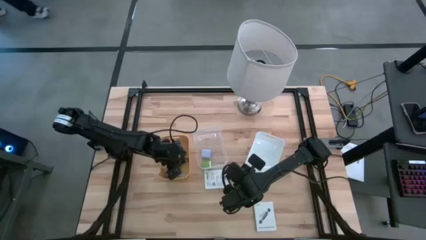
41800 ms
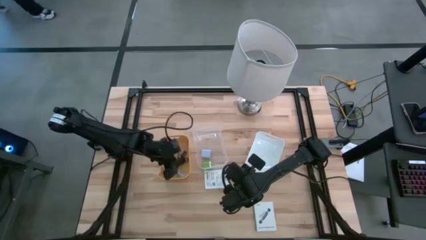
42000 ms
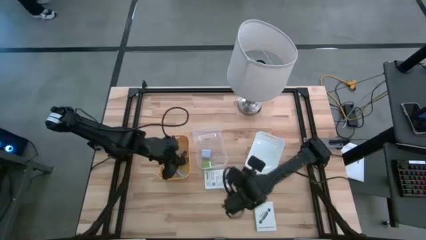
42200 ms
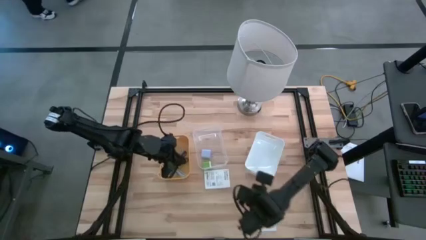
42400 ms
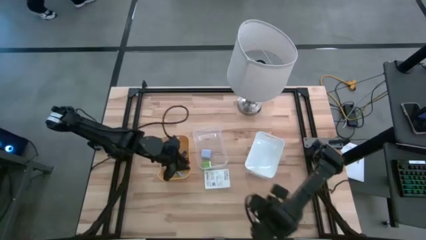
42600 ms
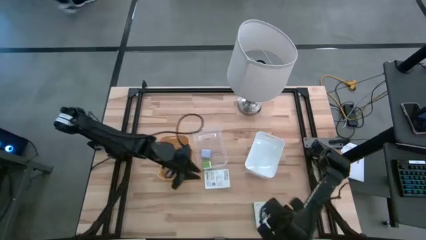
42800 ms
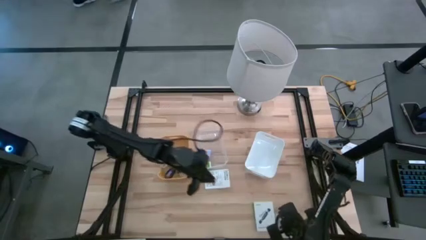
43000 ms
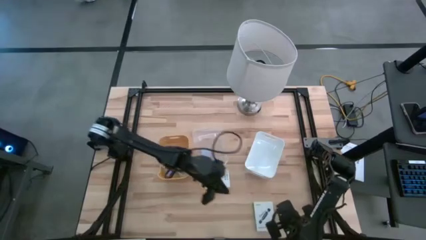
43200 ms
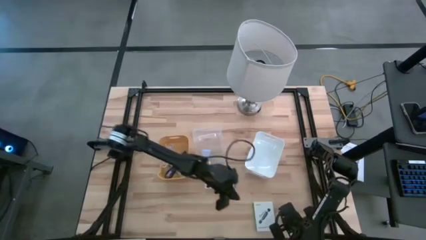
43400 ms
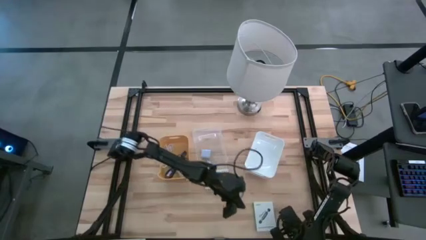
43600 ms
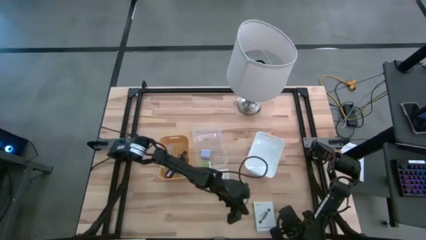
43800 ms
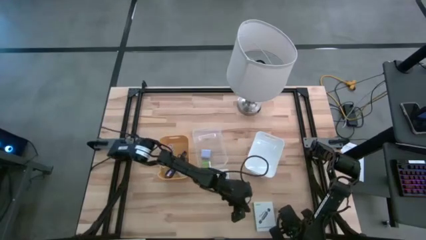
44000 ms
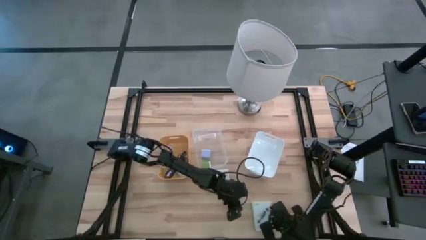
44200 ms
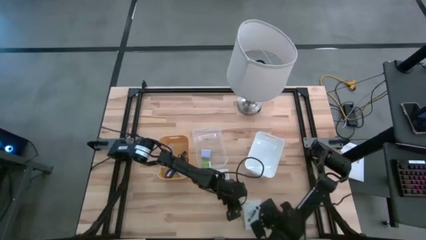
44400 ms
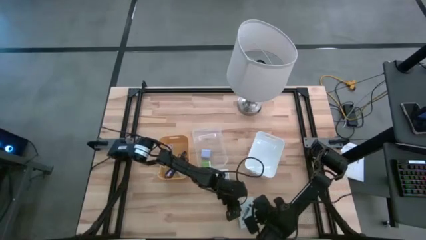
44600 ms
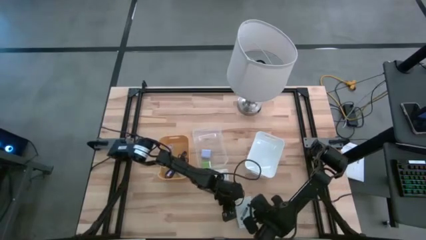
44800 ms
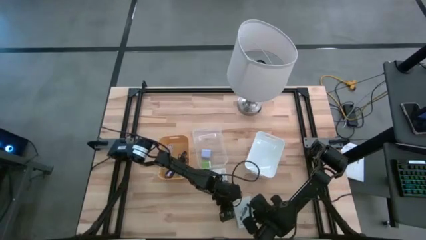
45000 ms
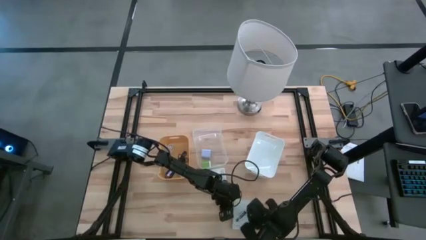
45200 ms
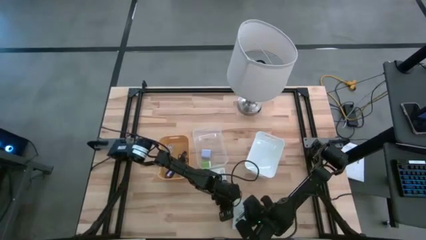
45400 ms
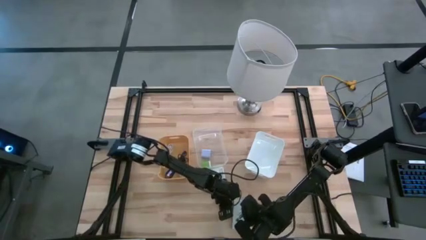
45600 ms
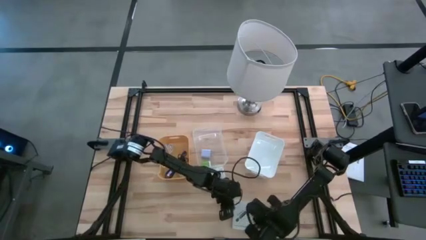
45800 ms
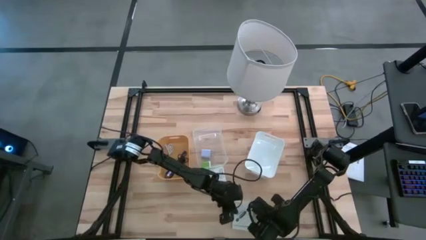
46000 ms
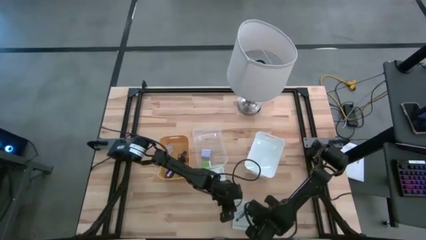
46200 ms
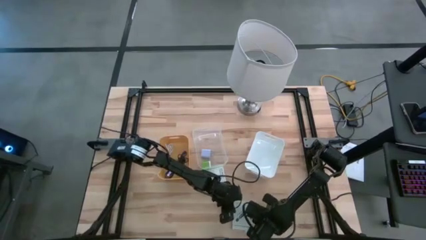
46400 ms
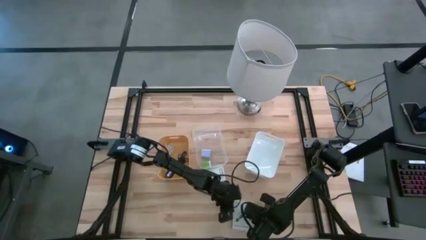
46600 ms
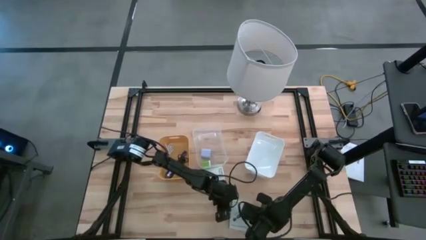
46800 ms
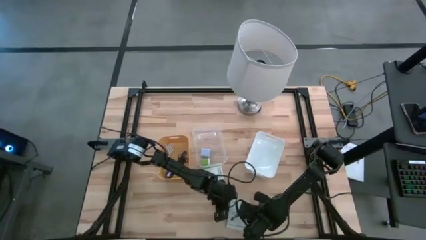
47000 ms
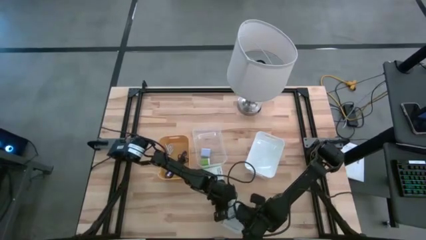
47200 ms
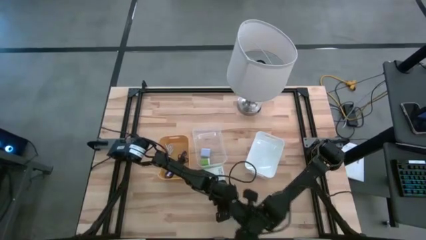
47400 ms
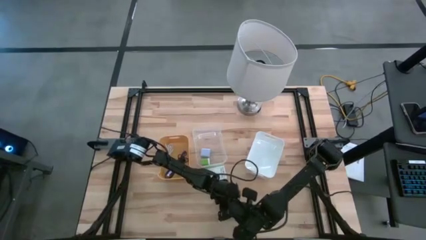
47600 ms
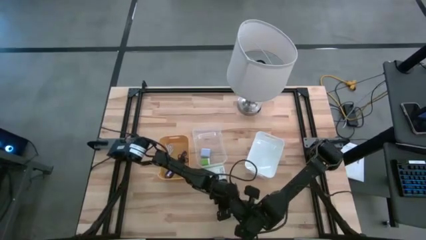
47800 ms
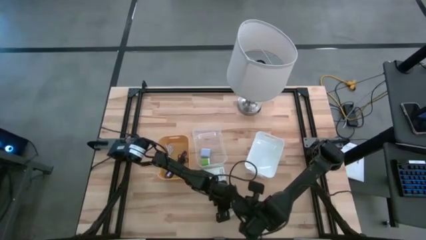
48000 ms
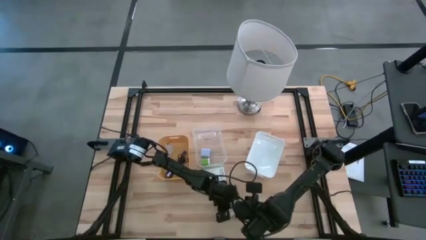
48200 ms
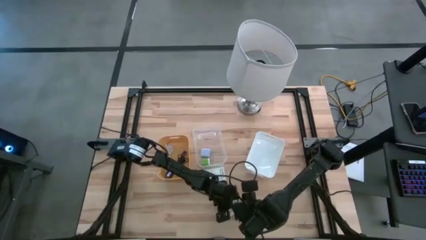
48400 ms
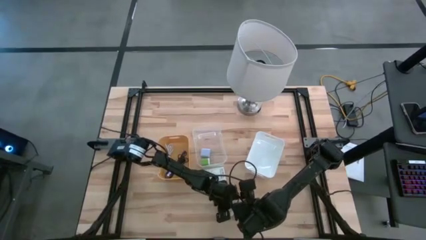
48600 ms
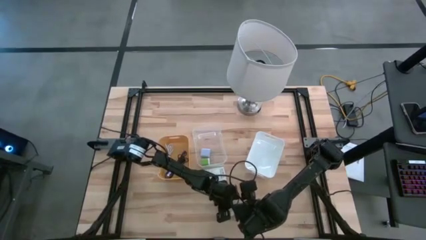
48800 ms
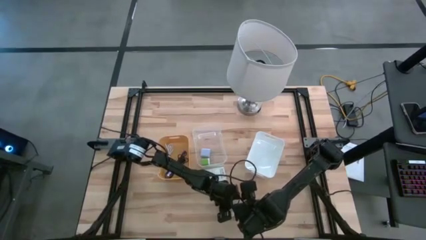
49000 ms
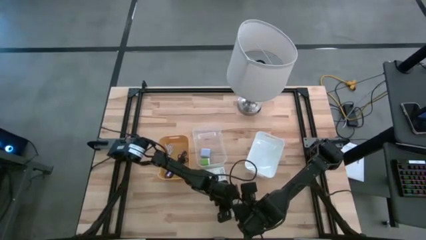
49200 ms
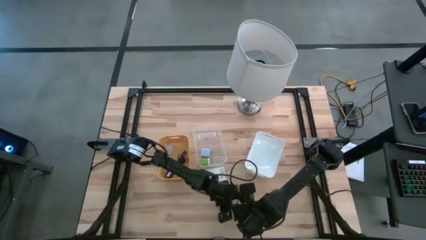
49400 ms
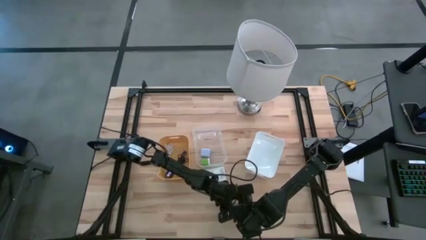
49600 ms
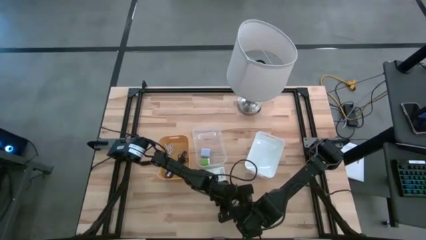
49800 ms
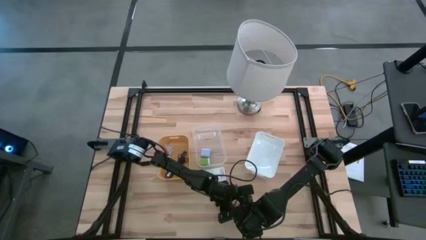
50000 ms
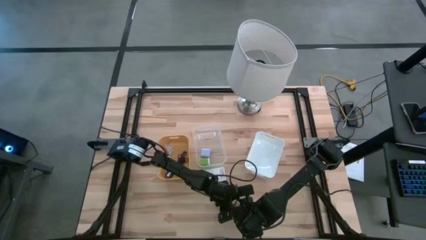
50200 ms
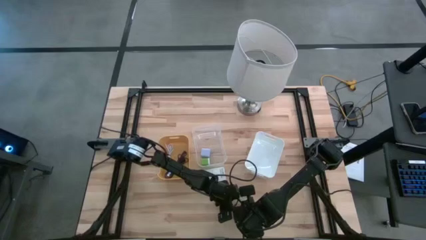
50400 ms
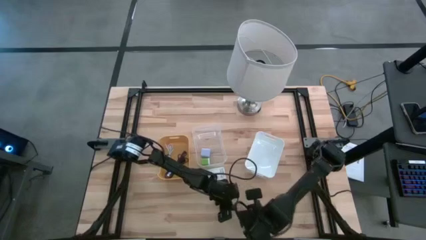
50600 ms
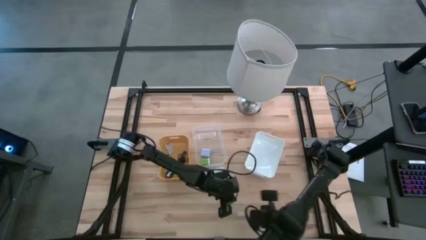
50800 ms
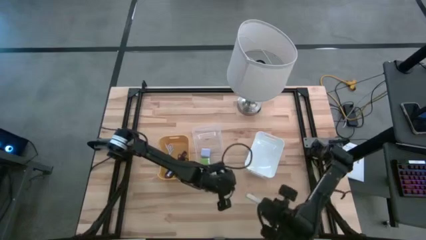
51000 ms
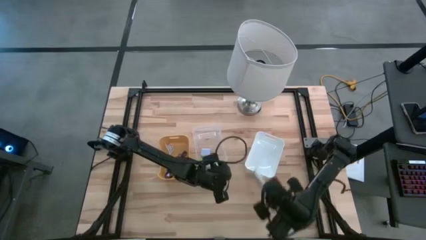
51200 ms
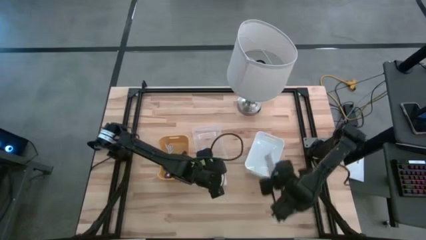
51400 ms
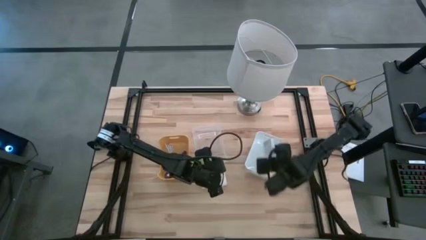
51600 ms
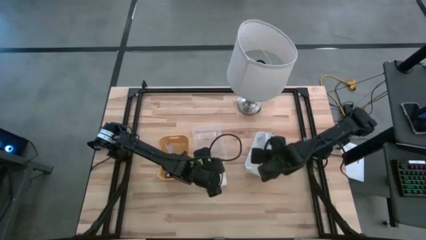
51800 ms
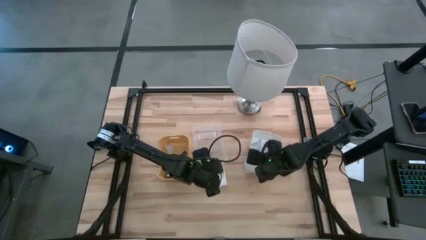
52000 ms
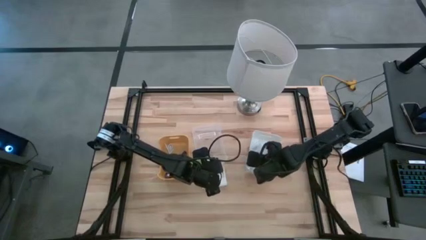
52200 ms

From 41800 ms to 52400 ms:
Task: Pick and place items into bin
Put the bottom card reader box into the white bin

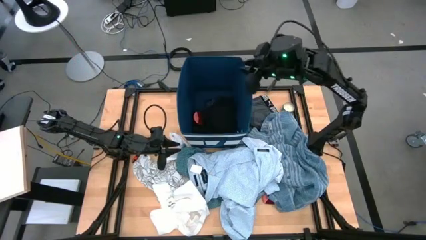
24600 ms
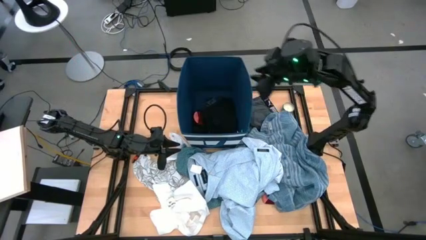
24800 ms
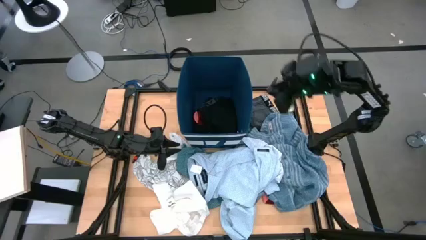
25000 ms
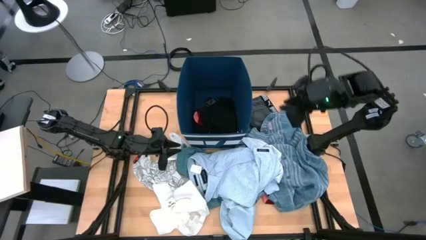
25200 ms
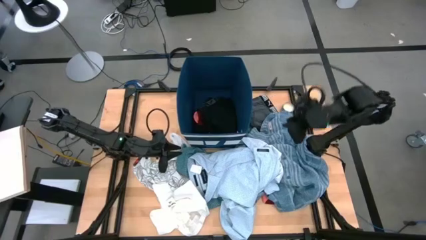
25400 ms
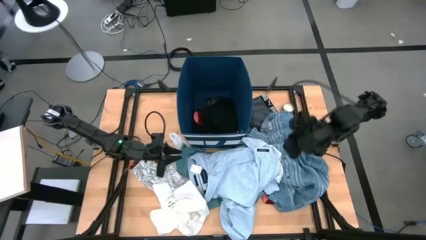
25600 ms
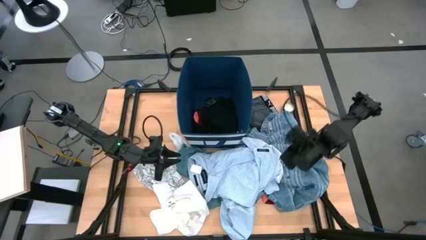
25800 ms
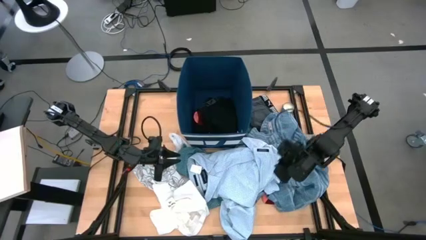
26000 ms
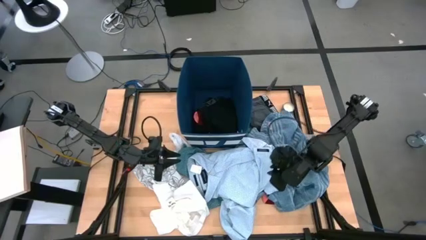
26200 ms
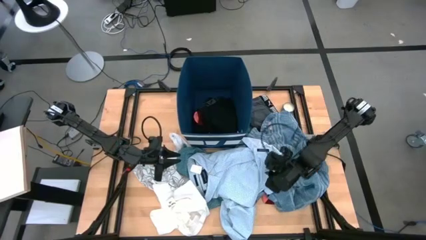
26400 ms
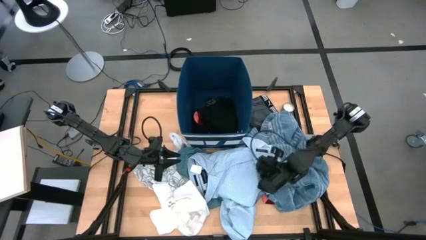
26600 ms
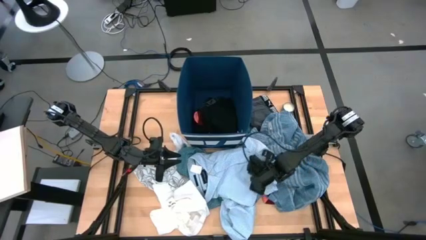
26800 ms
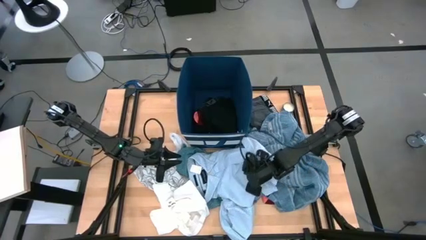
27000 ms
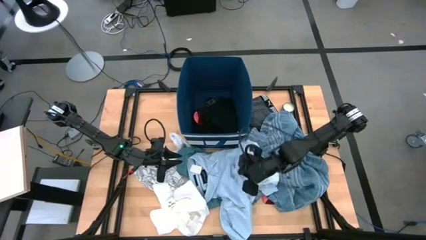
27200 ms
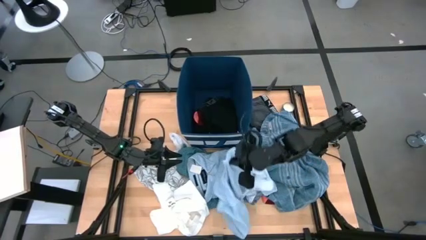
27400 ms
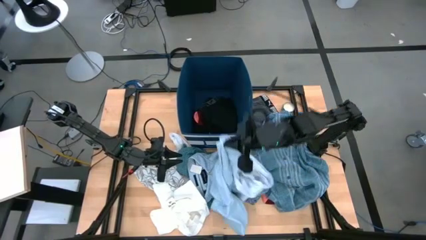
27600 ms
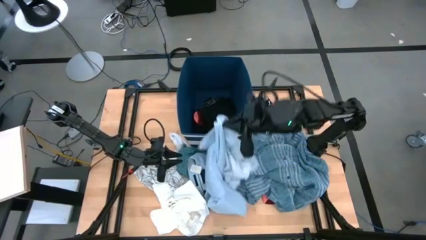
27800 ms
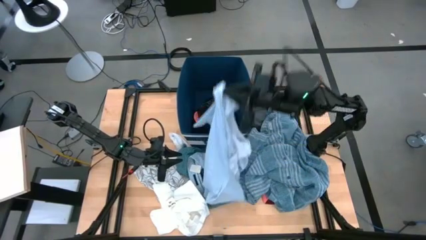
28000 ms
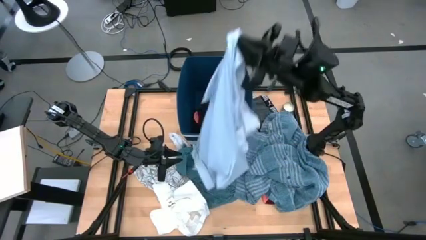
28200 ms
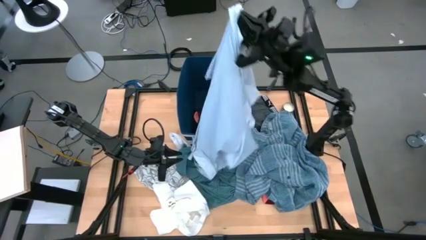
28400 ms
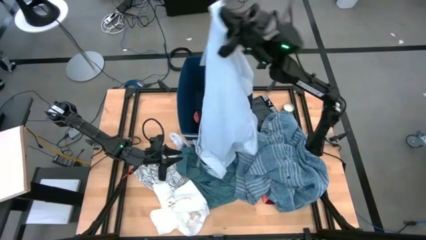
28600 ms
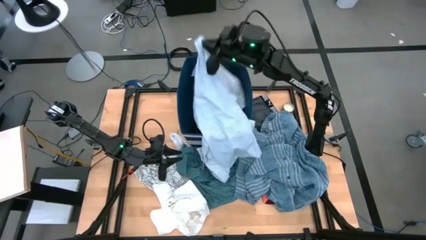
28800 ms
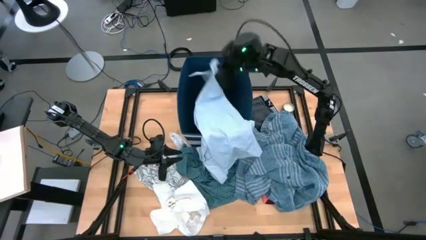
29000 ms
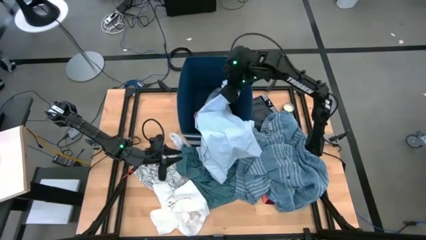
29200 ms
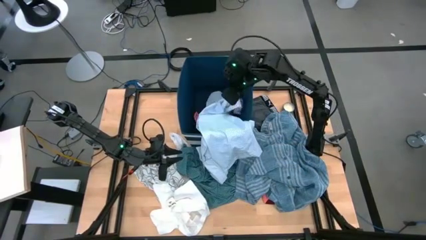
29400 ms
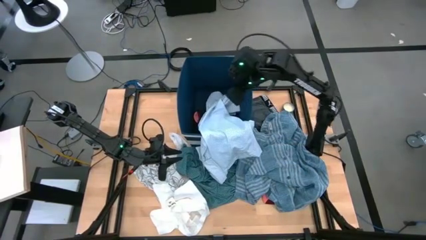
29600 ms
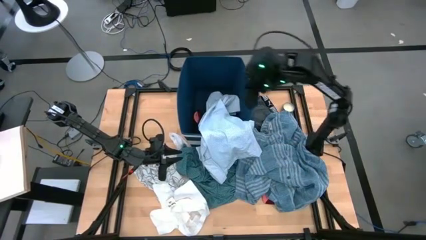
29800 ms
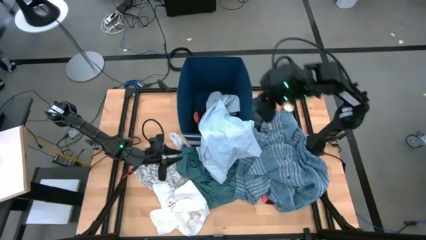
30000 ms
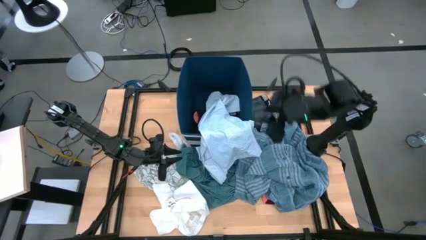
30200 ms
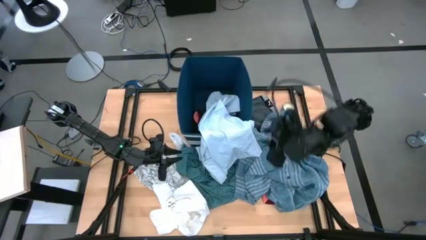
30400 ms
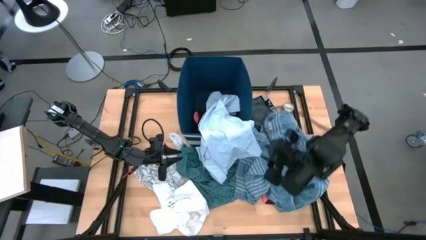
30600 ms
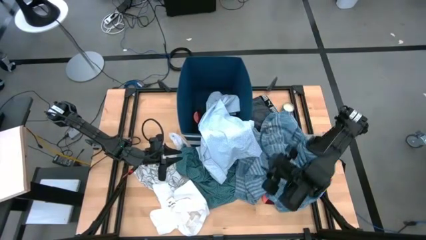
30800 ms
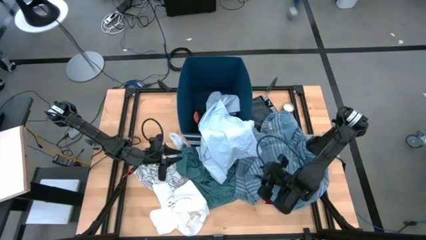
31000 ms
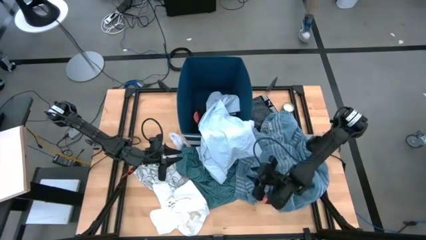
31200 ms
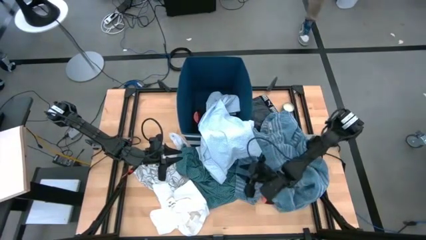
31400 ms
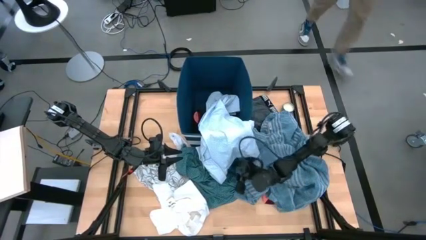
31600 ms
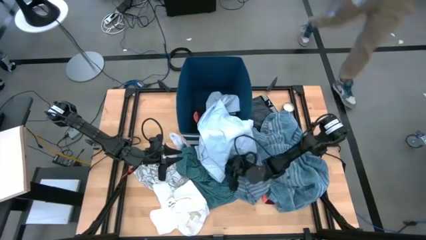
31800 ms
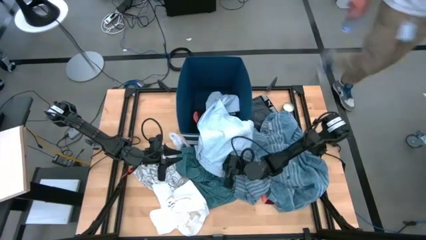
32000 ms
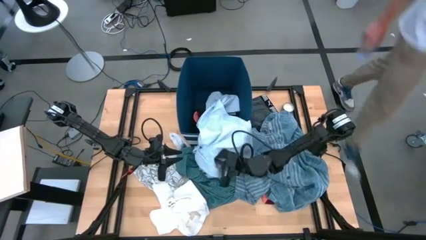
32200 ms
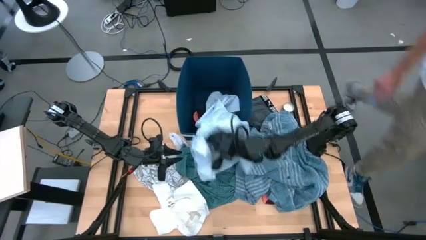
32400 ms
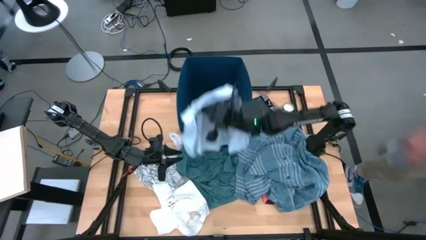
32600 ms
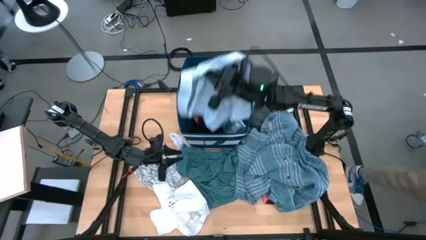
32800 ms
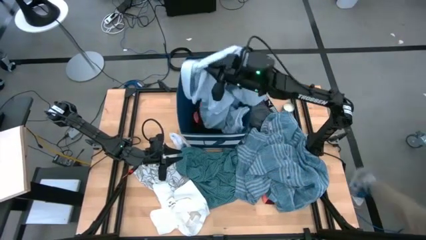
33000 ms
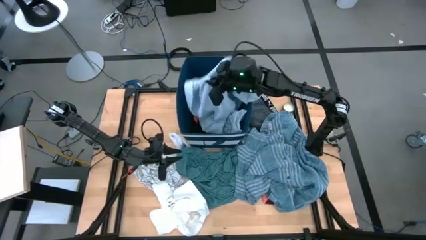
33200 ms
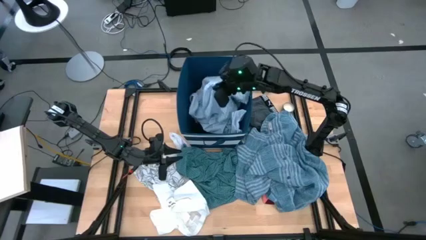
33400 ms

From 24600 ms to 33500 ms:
Task: Sort clothes
Put the white pattern polo shirt into the blue bin
